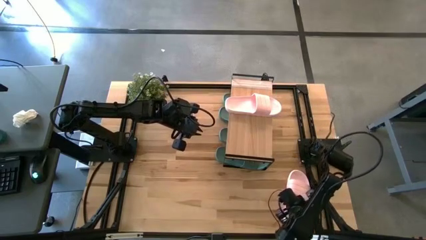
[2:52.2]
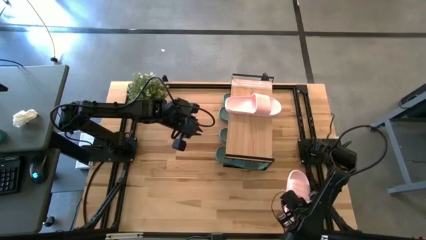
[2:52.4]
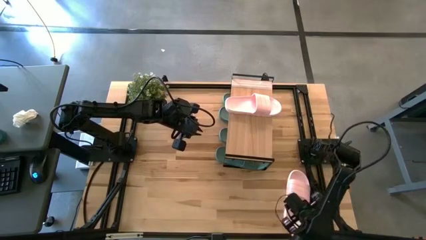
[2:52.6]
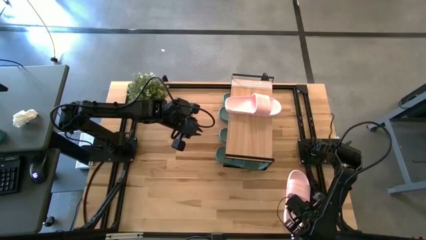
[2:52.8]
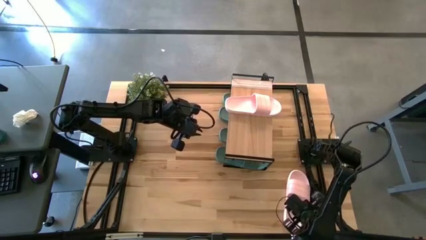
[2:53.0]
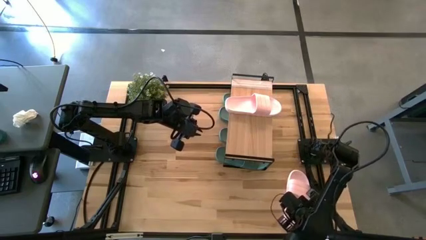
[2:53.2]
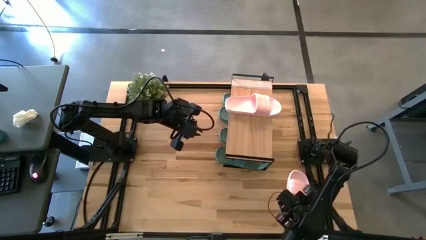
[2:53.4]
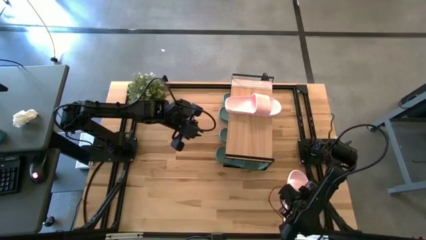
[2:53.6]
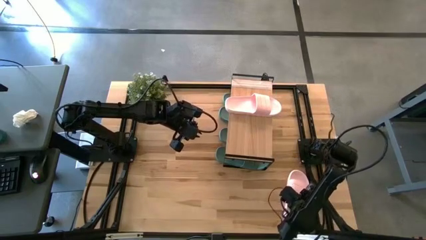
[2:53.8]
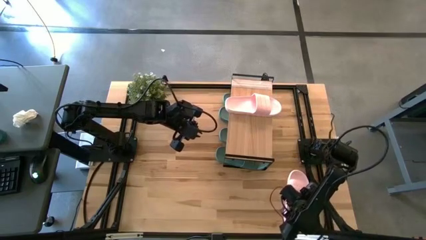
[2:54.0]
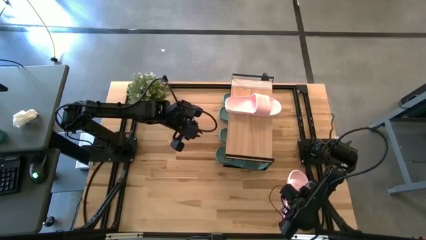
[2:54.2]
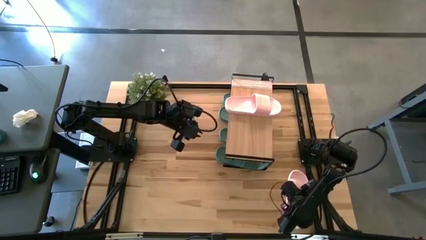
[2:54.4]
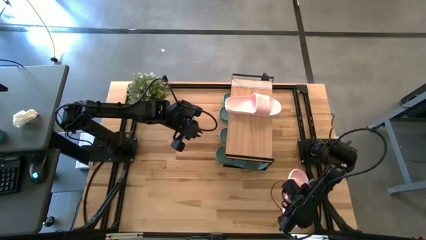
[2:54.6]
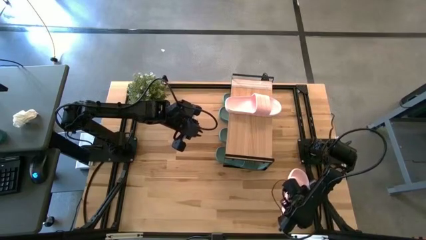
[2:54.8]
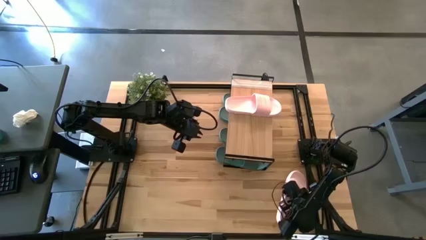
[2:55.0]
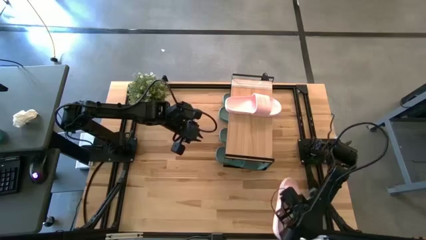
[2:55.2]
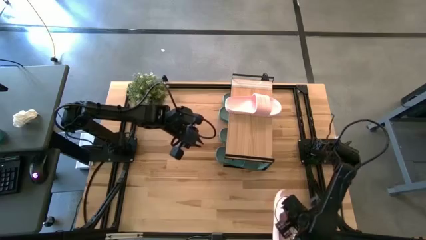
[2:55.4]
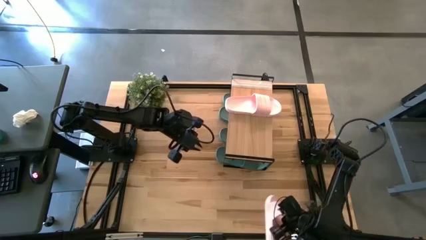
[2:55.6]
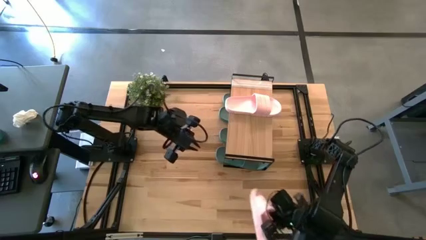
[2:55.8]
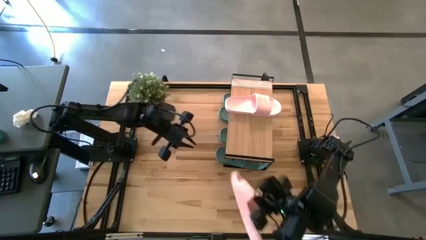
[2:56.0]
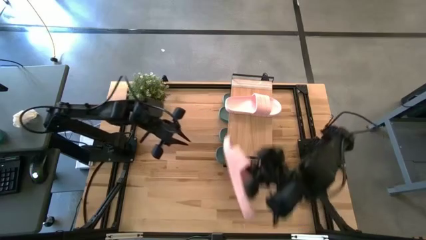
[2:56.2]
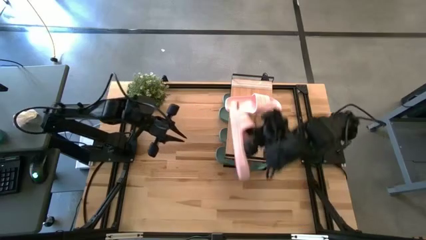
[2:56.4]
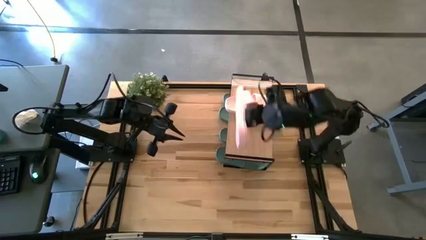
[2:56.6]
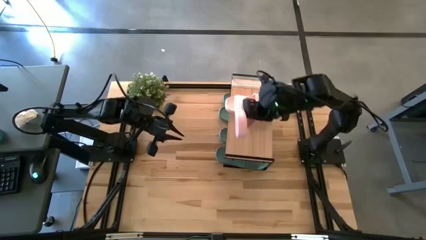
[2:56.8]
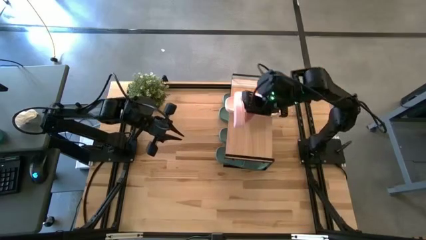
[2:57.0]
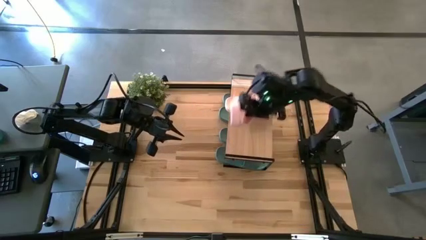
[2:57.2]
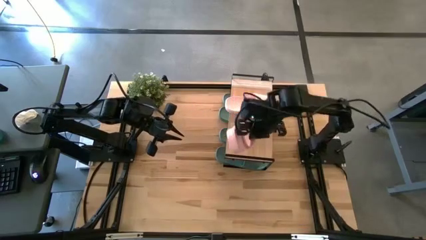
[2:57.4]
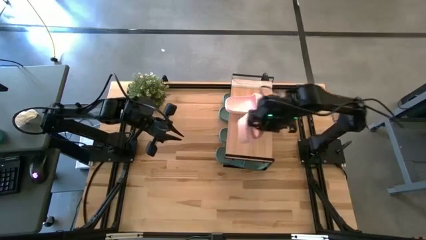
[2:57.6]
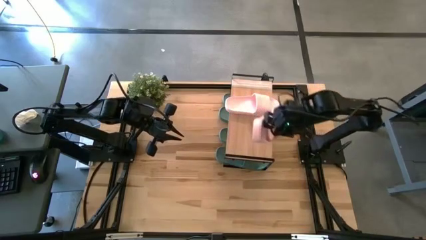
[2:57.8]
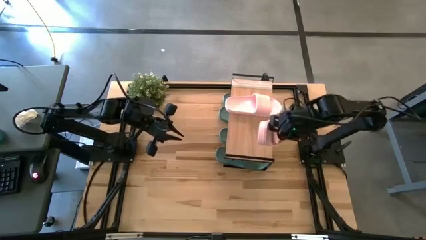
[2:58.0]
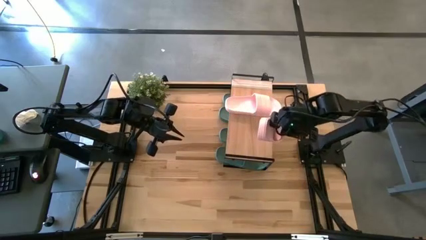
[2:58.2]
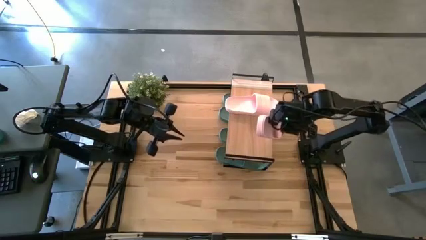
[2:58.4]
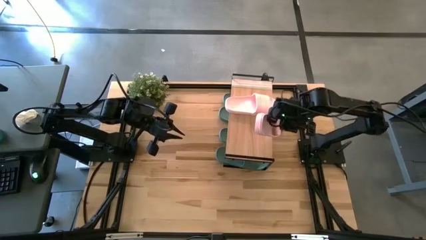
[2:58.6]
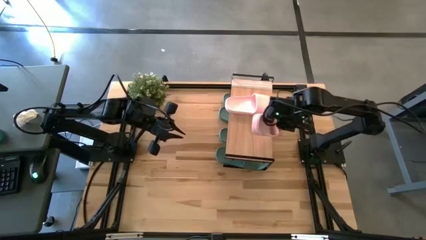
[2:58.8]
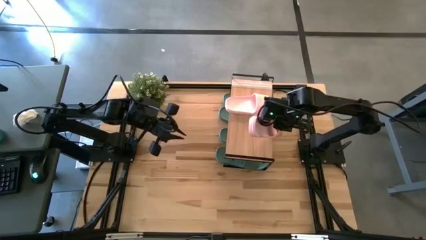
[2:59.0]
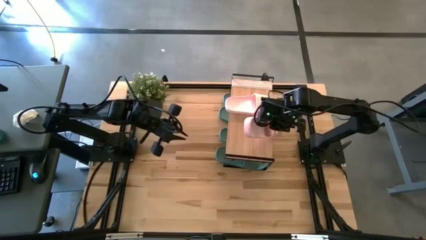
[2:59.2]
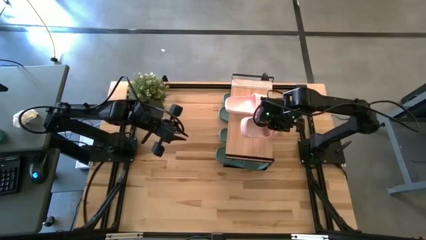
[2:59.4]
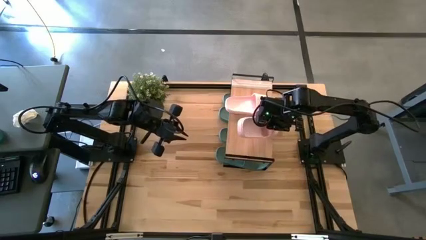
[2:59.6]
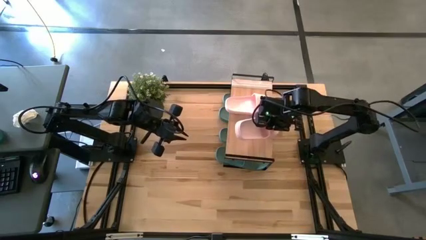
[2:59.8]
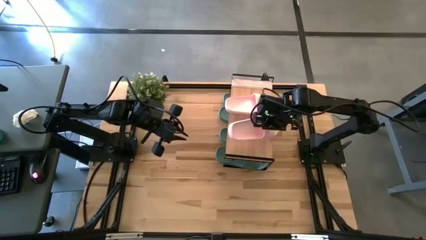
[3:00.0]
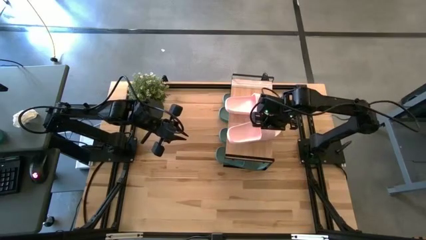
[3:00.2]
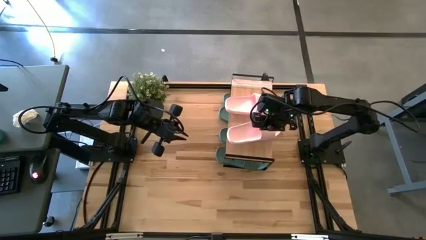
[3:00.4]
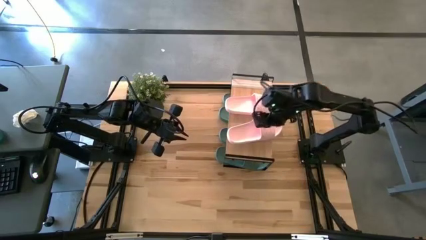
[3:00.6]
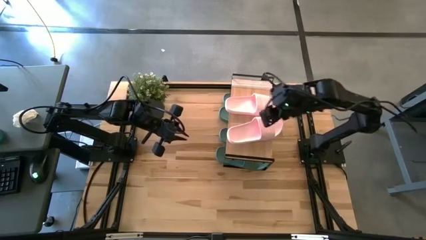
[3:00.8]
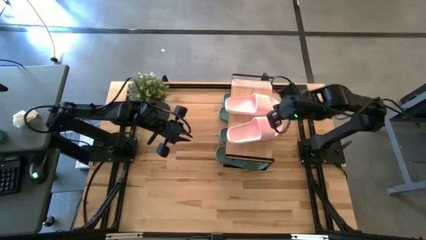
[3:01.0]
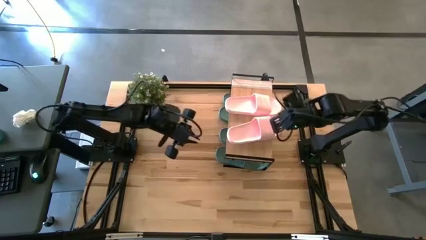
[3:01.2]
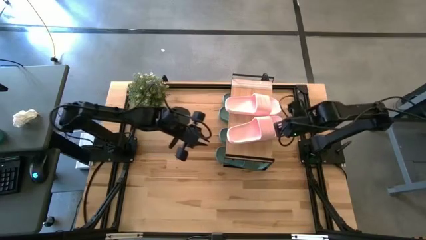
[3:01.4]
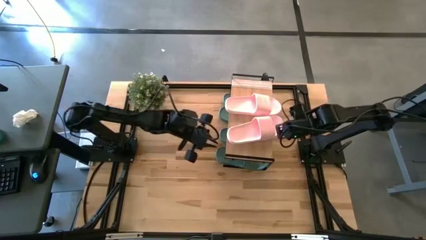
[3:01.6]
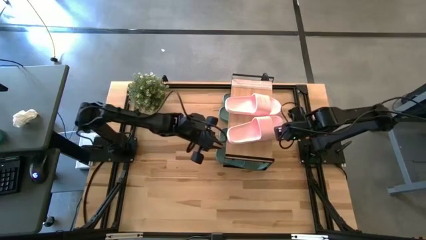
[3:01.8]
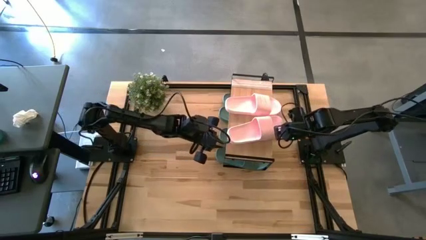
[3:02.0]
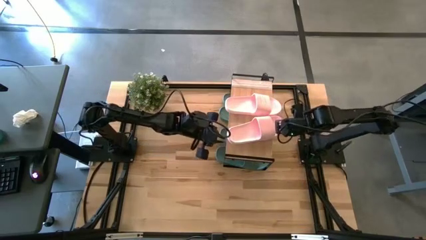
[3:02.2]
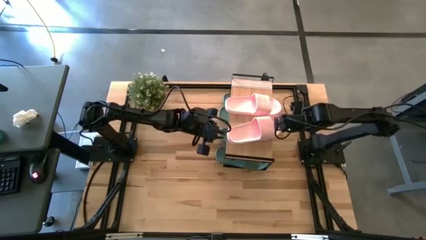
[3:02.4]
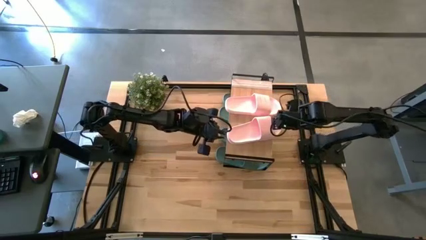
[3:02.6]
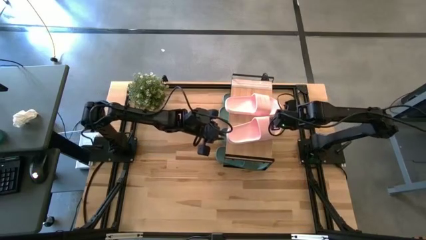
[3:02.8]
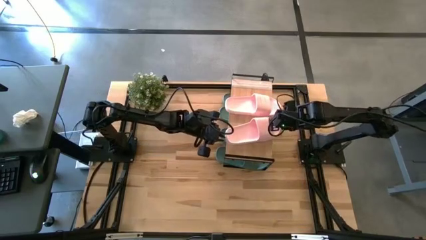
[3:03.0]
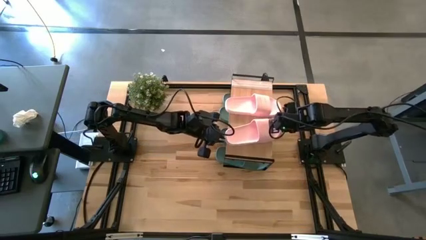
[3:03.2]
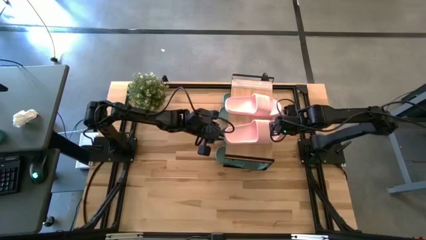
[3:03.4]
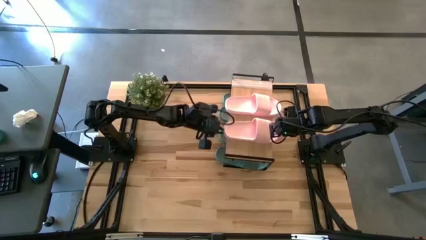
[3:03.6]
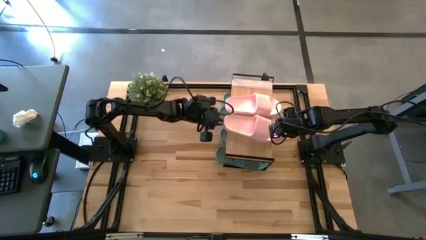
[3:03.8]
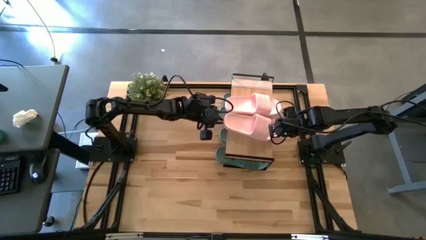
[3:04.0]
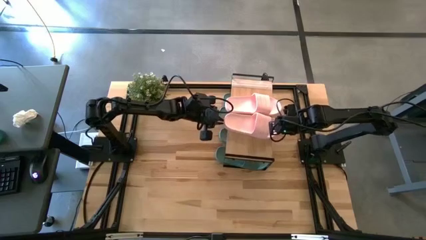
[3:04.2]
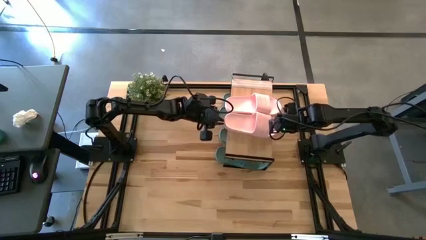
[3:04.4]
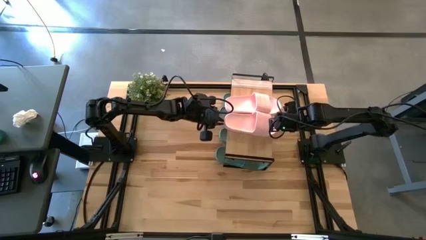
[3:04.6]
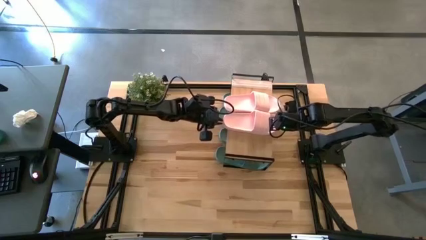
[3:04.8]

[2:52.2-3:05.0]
Task: Pick and place slides into the shelf
Put the pink slide on the shelf

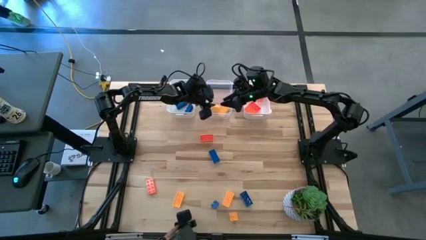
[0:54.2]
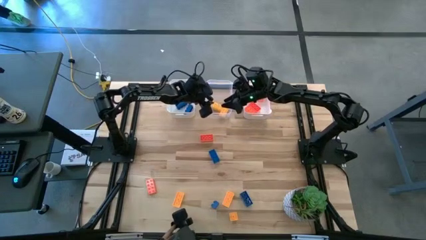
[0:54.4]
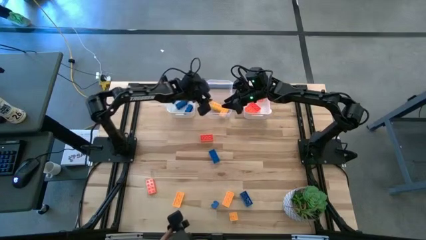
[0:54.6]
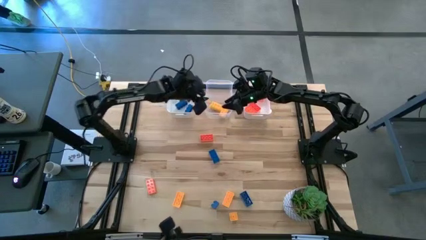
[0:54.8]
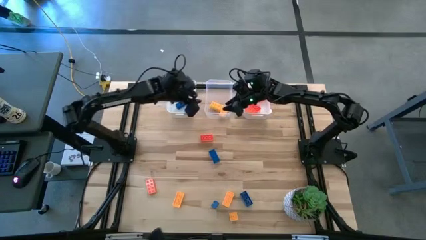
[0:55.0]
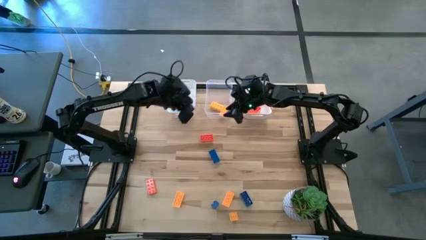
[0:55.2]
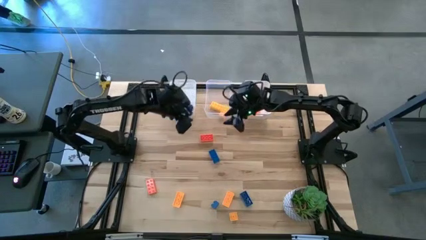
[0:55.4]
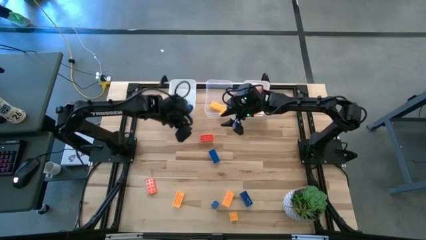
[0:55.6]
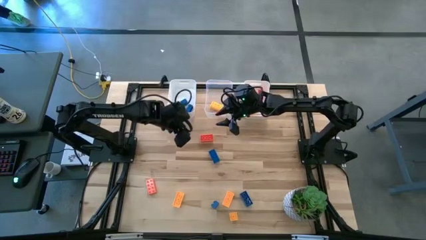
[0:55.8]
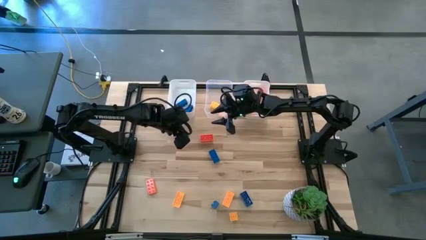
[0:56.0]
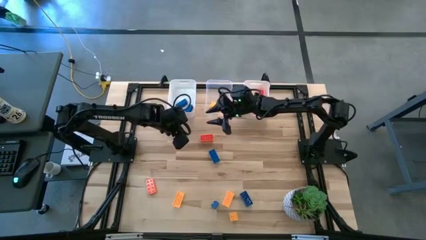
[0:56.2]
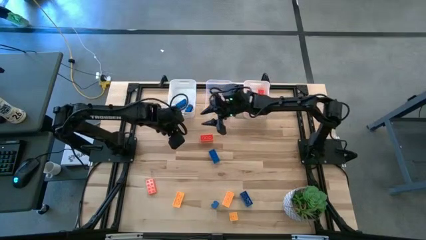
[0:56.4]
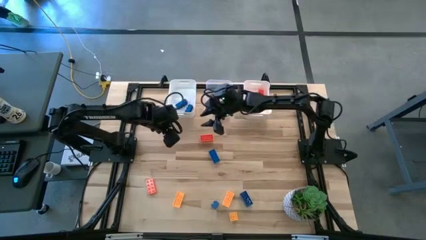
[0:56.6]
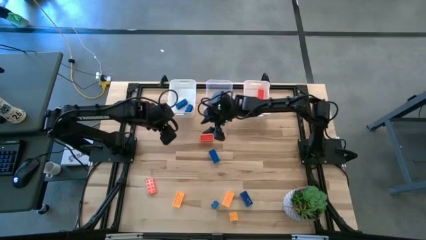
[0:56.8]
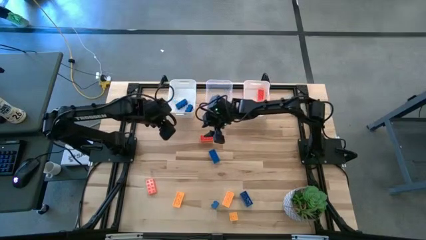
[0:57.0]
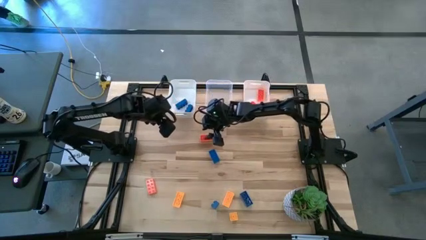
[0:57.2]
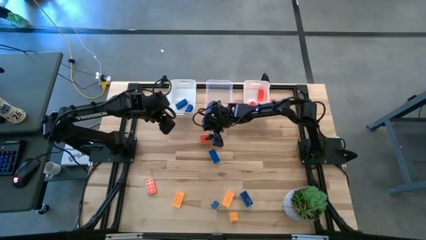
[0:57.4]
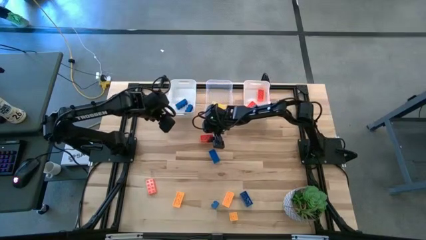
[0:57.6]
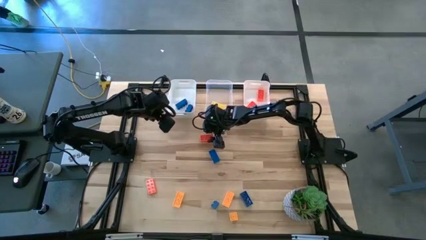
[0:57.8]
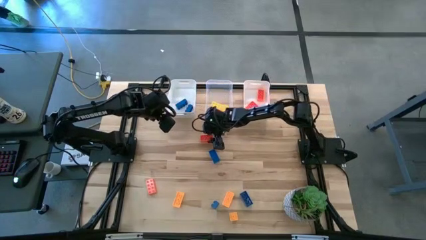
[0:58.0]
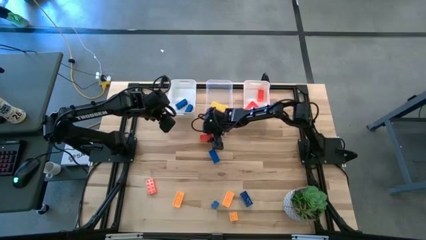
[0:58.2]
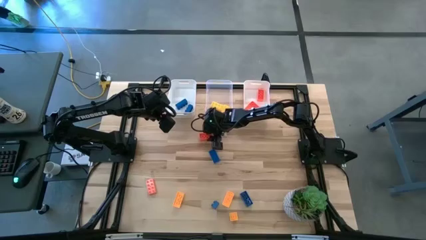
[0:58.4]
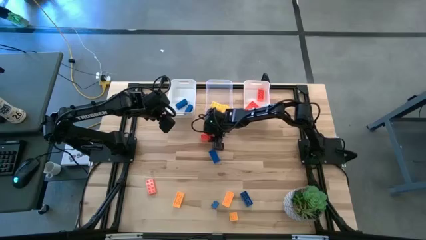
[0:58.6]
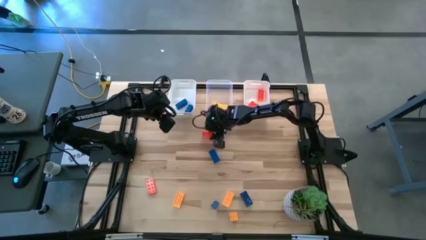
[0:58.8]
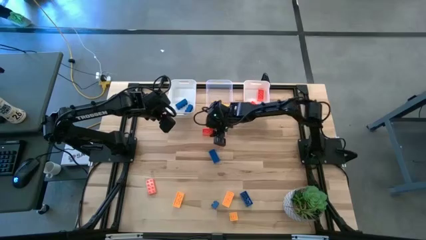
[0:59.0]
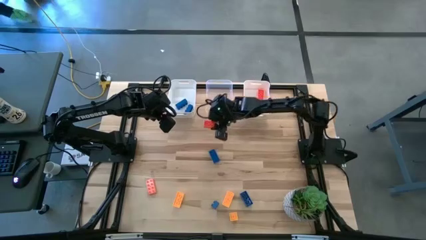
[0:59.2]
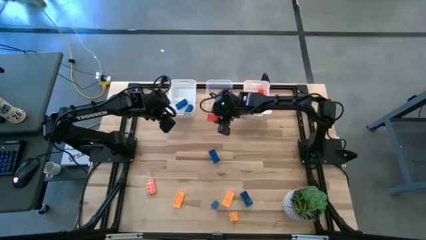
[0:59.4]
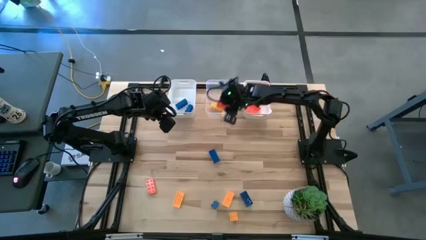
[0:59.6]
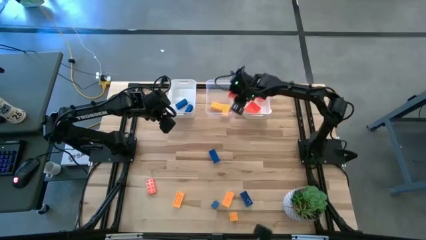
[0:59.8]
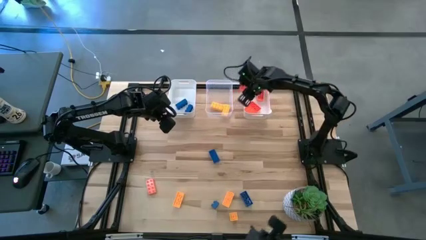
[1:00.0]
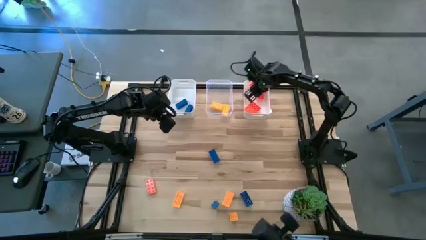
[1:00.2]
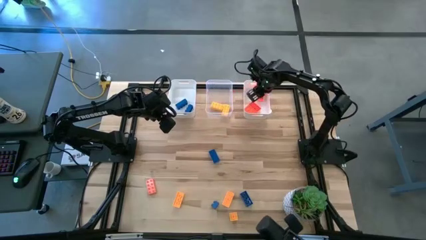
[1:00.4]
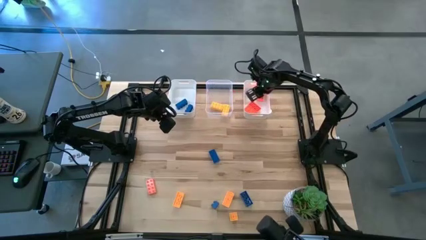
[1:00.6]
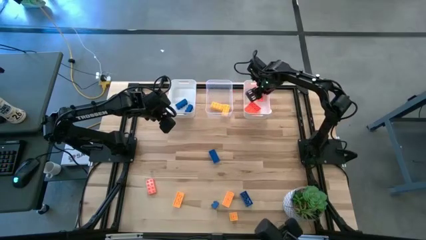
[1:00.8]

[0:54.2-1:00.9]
Task: Sort & place blocks by color
Put the orange game piece into the right white bin
